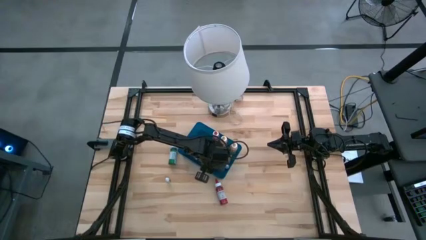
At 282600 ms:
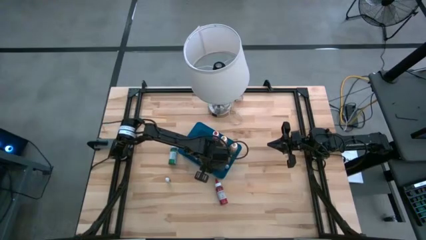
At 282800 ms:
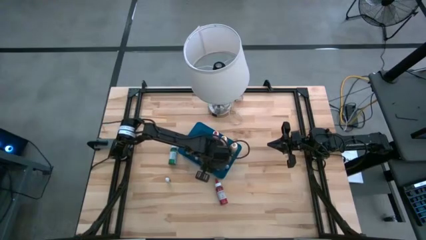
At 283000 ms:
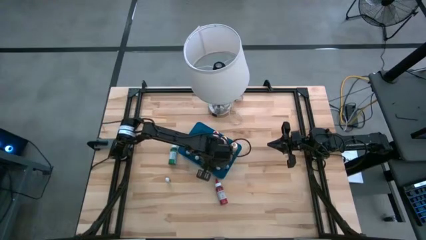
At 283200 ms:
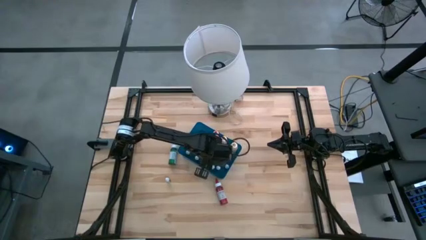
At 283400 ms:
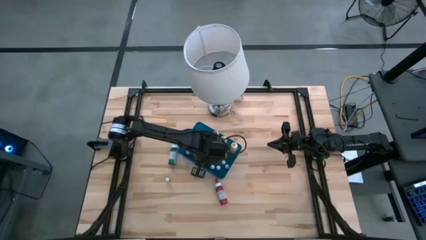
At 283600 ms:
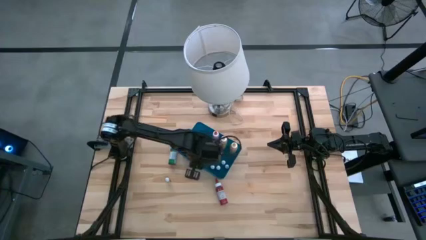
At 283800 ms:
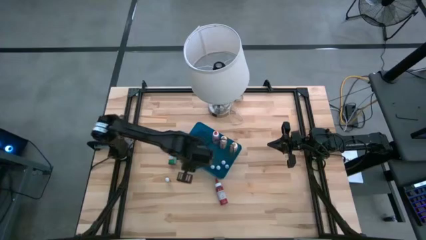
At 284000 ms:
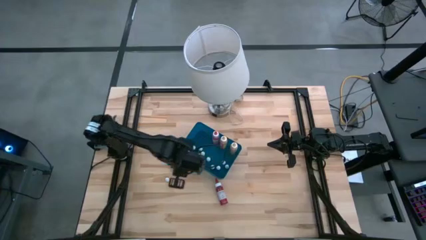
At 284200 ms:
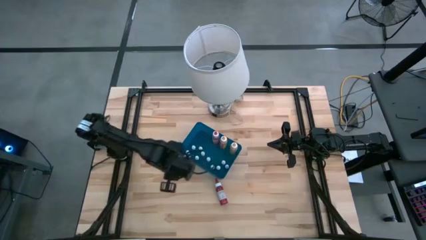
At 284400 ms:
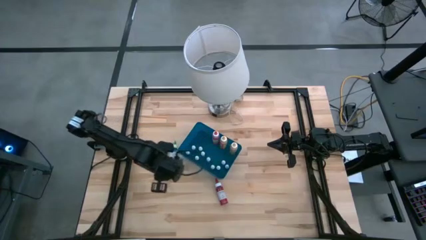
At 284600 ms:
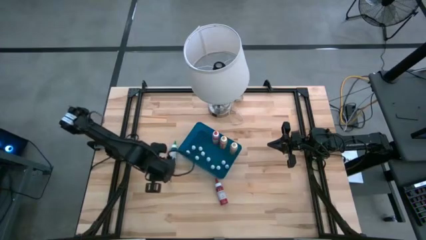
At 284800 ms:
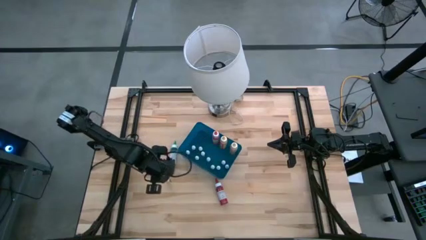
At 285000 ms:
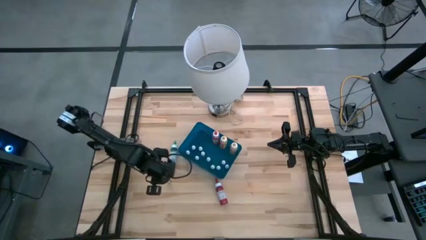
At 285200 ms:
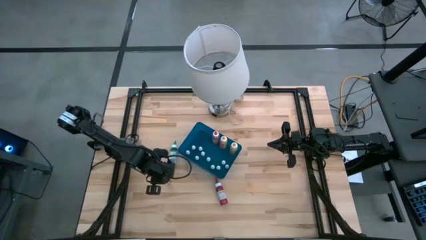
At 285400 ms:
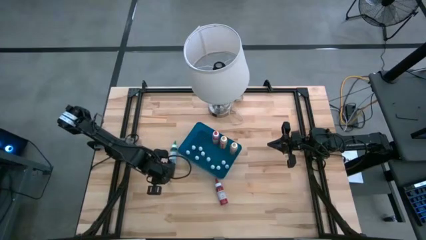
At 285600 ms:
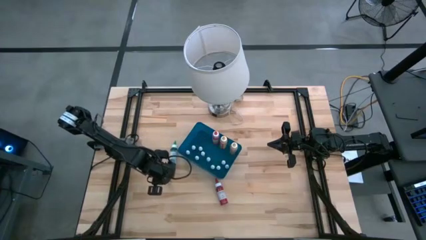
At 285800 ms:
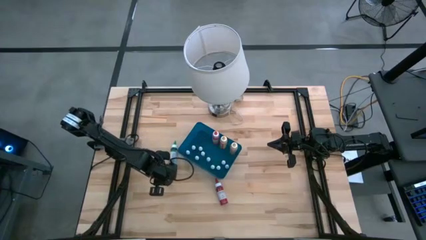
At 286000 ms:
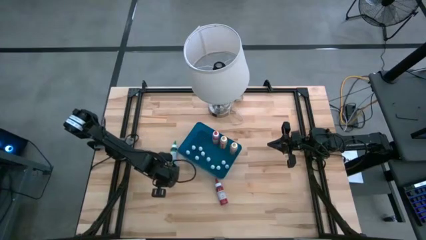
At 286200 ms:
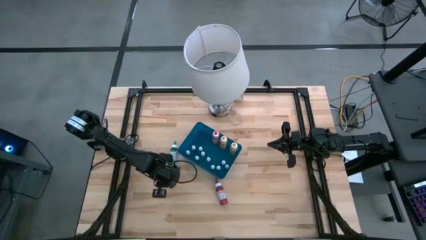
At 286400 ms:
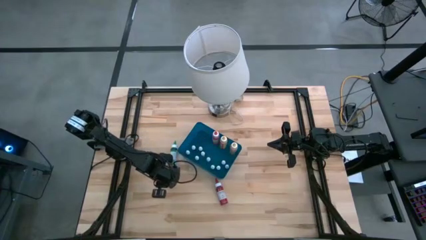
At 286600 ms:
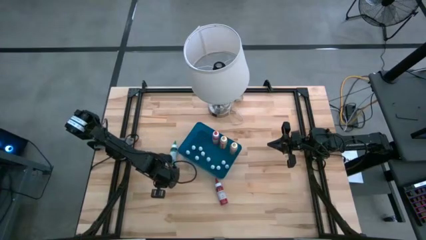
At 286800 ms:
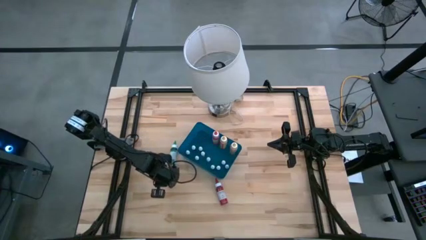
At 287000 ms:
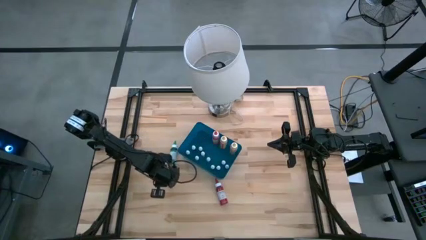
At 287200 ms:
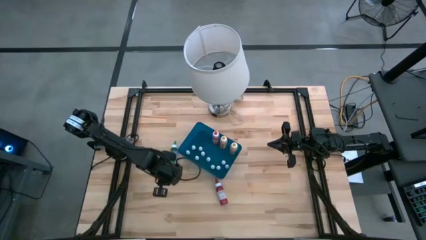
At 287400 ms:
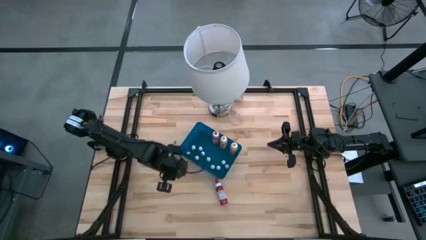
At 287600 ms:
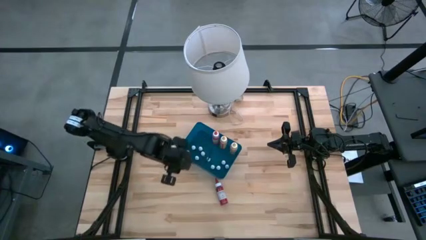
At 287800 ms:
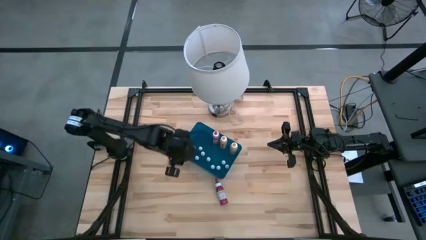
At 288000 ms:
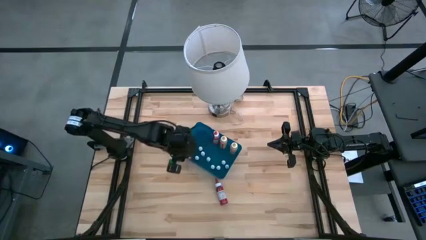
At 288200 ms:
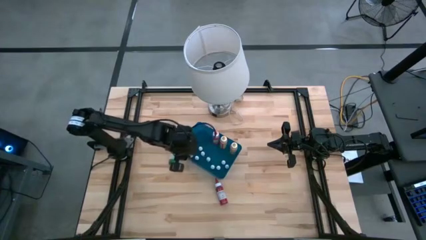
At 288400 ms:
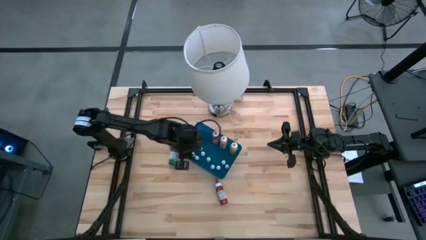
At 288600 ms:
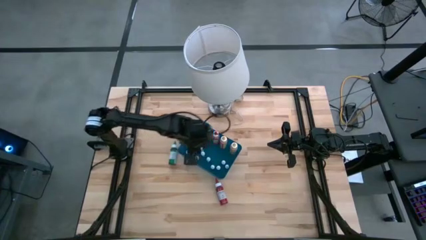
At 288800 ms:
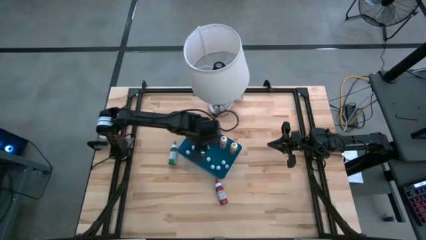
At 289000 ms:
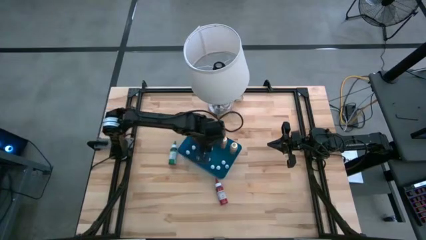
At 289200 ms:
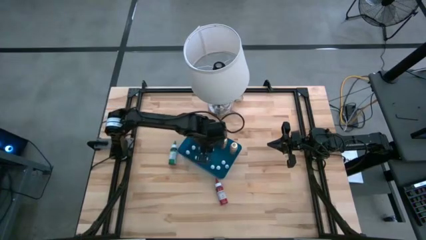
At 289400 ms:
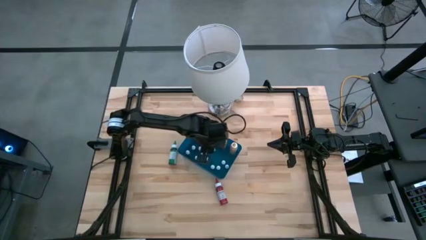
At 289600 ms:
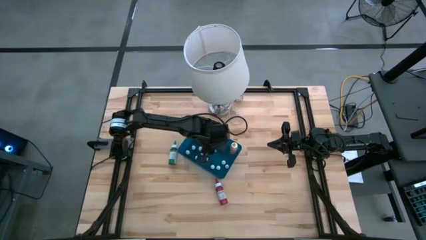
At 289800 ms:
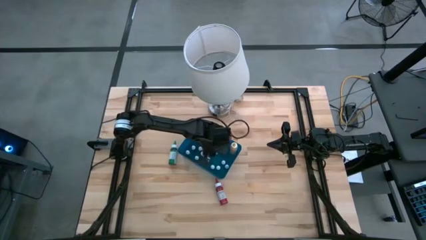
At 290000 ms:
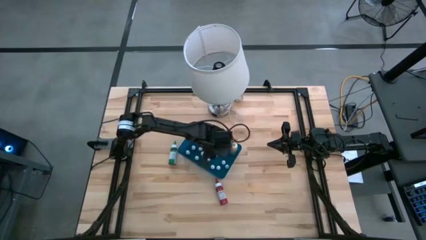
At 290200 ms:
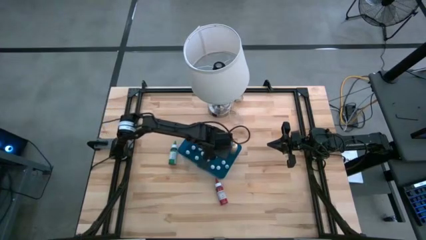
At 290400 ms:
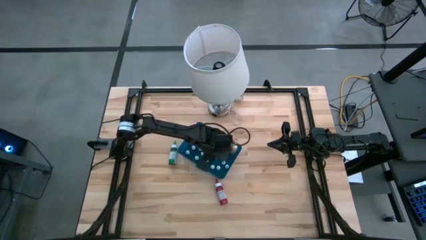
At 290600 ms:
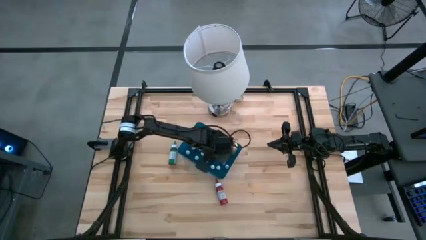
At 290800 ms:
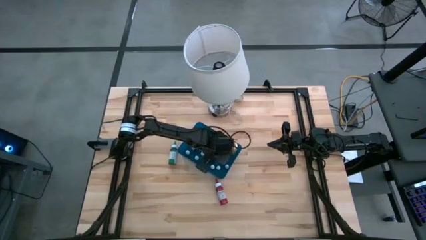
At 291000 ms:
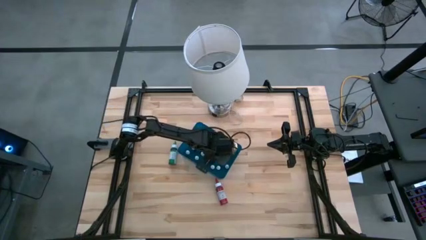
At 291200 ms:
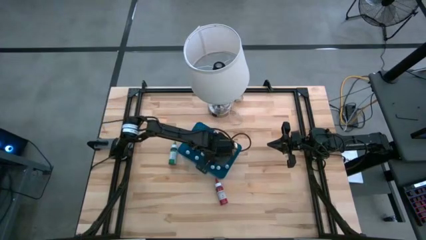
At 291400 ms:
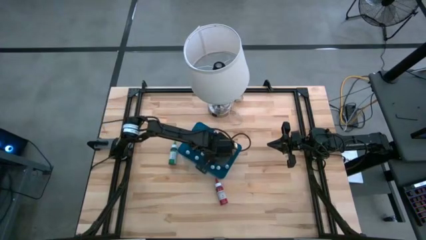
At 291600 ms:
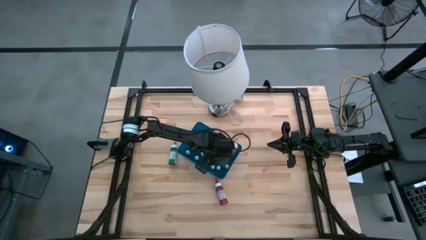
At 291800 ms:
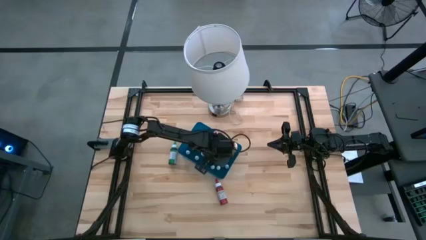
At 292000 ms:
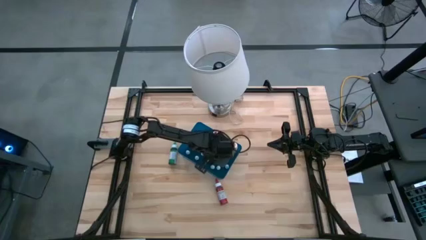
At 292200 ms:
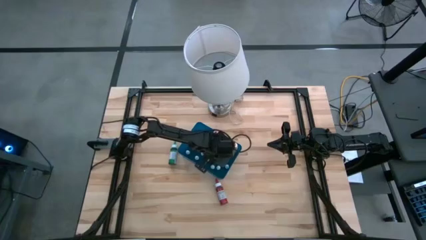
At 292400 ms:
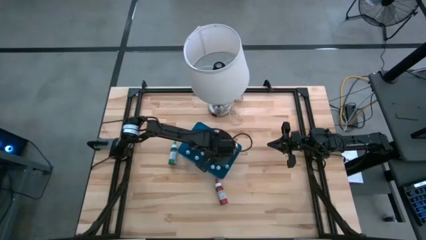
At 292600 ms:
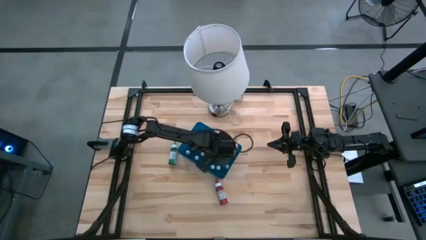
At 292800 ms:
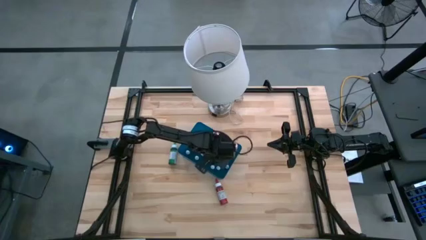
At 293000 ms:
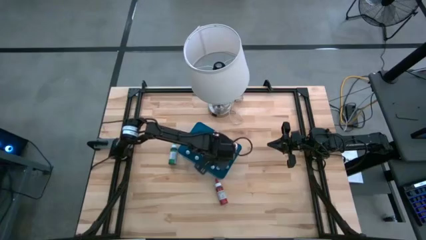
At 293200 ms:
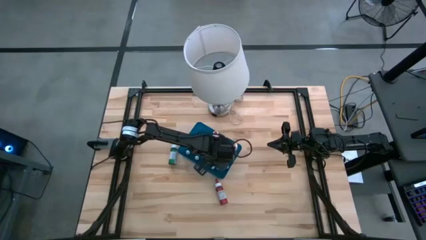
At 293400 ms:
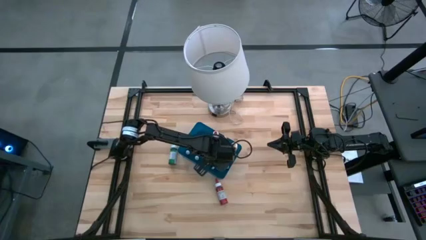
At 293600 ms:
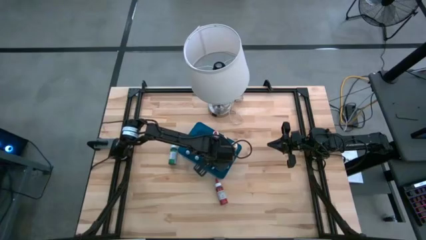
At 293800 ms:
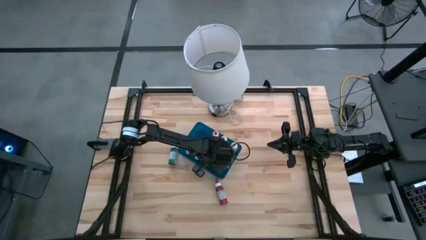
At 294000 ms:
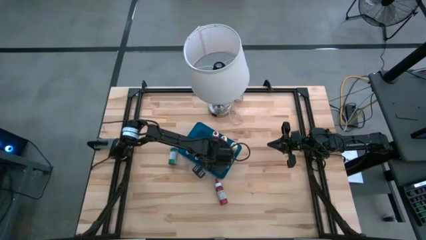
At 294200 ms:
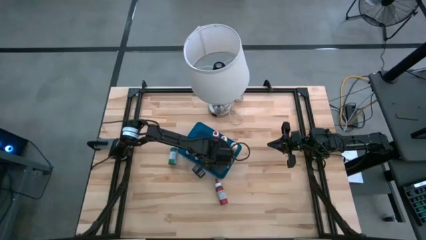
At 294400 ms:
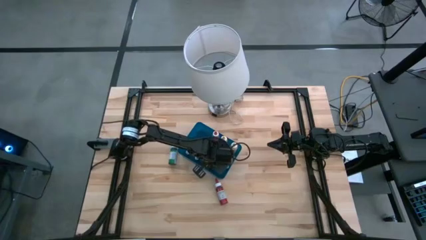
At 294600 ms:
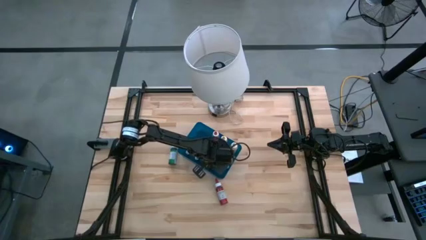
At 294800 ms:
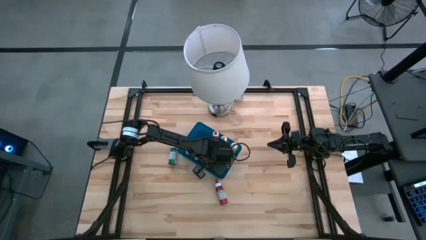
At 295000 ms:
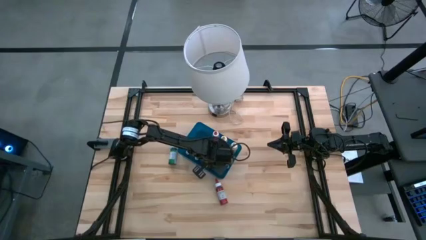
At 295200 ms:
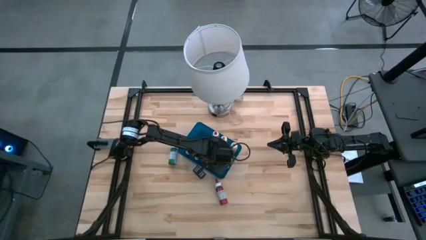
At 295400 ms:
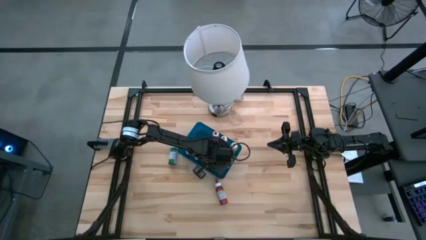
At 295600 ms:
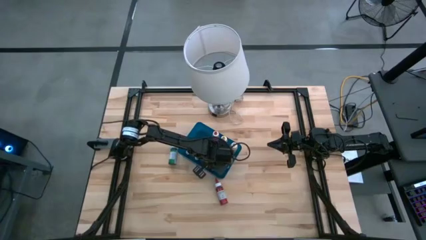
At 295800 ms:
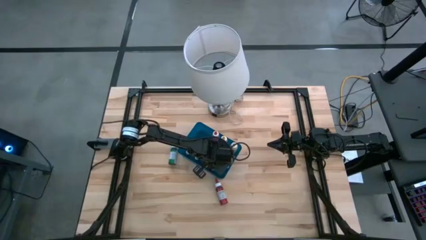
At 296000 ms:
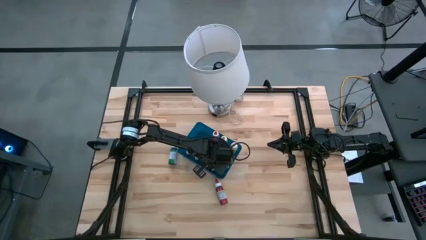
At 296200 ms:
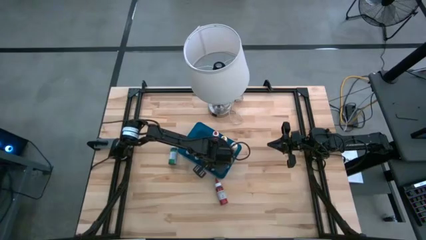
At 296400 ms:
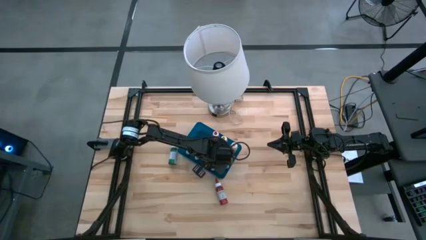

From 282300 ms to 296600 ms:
Task: Pick & Place food coloring
Put the small black food coloring bottle into the blue container
